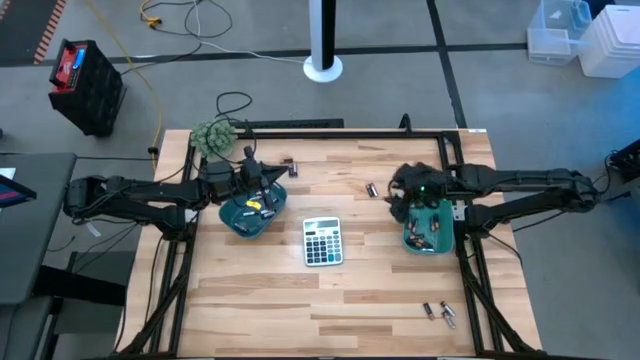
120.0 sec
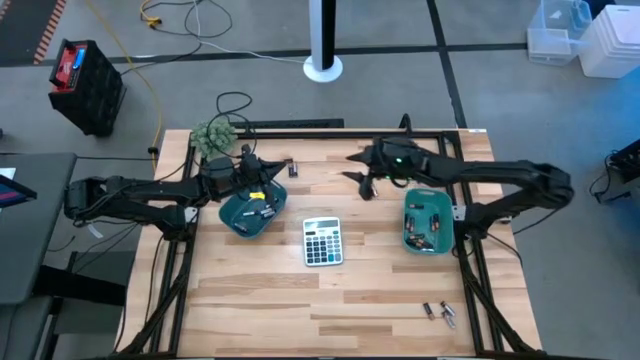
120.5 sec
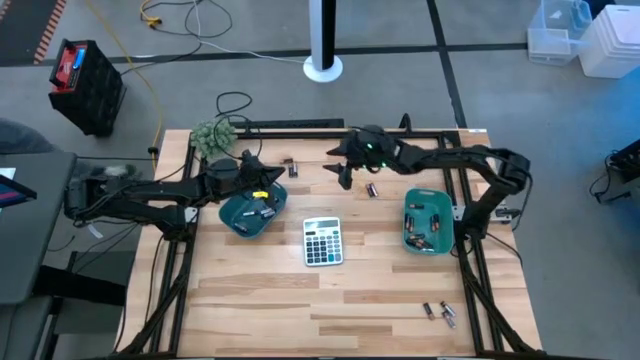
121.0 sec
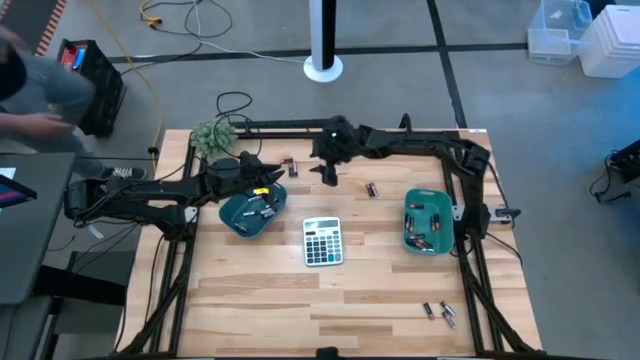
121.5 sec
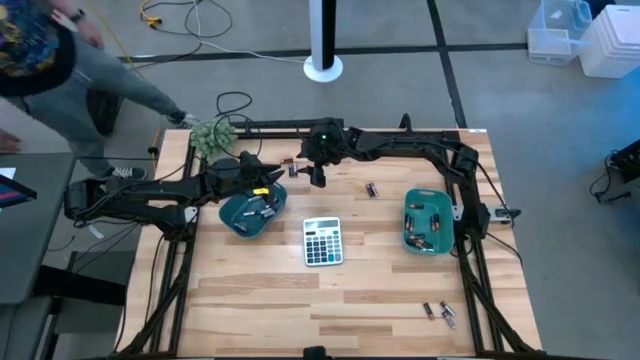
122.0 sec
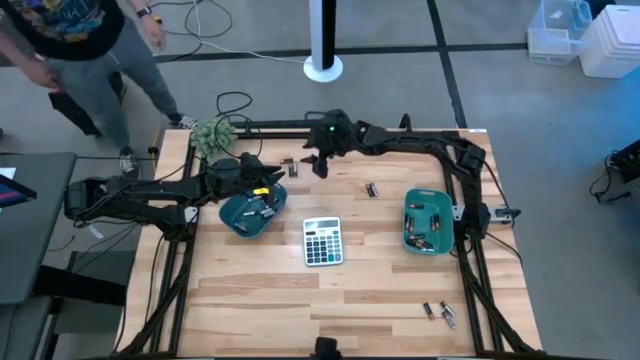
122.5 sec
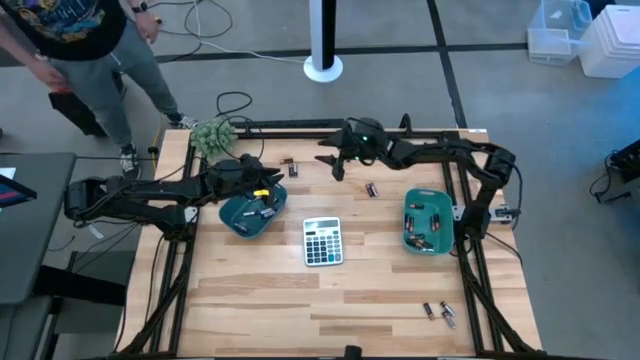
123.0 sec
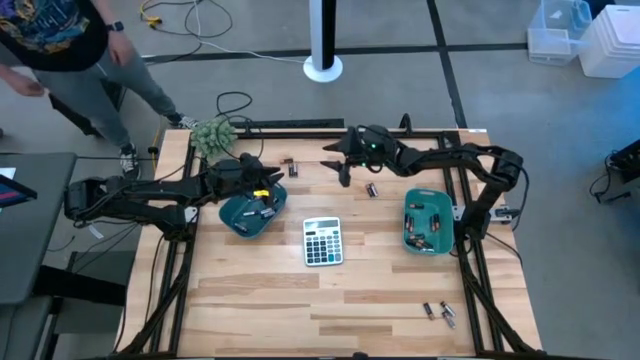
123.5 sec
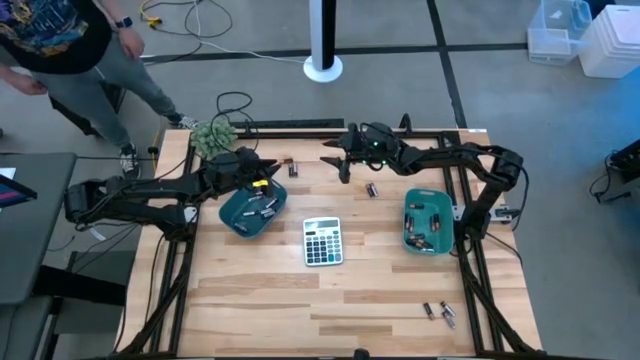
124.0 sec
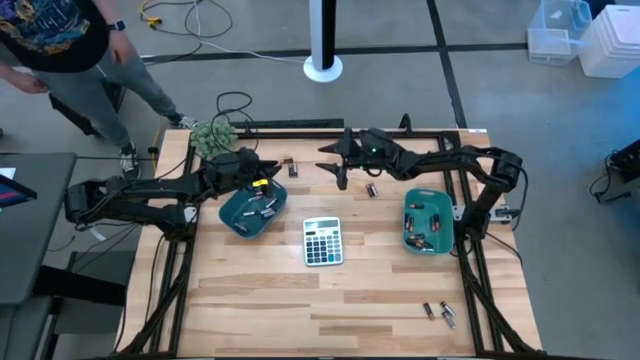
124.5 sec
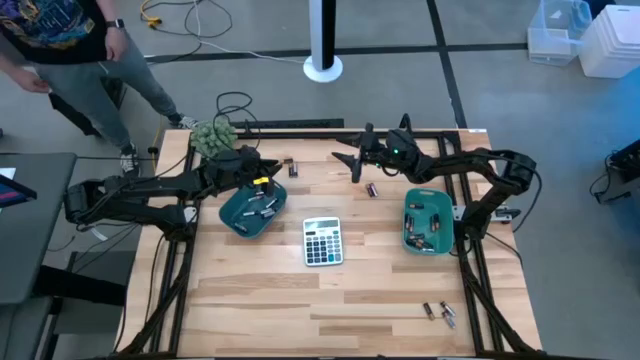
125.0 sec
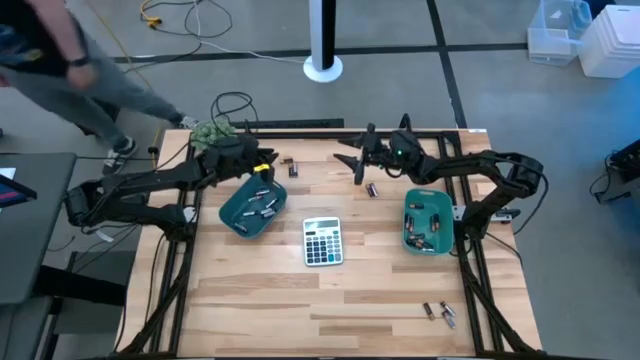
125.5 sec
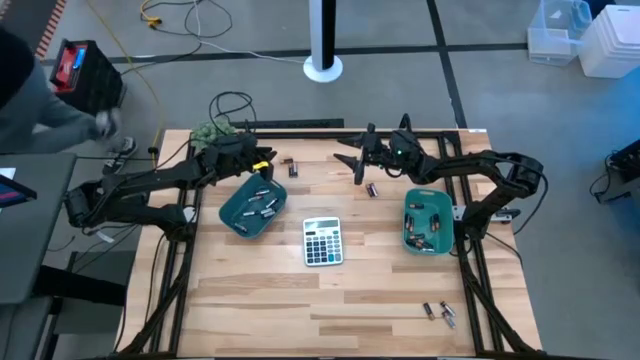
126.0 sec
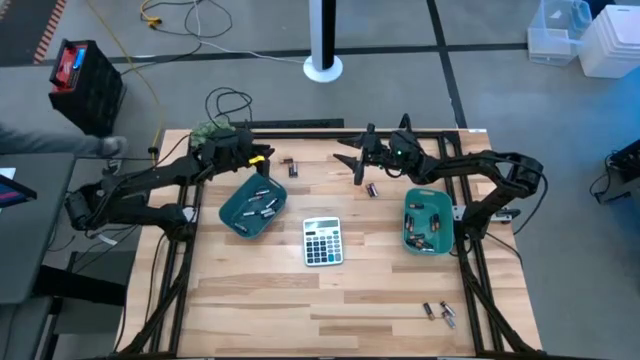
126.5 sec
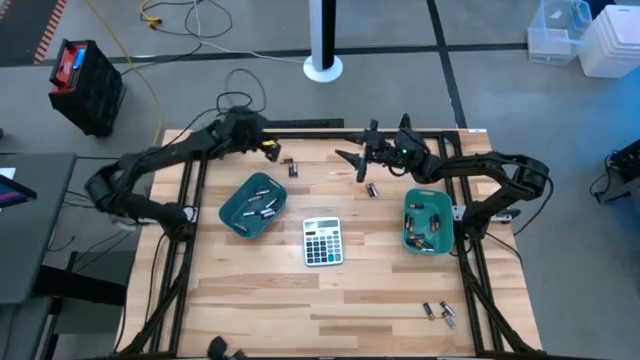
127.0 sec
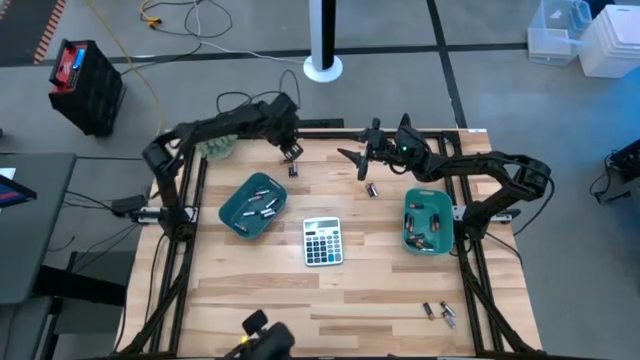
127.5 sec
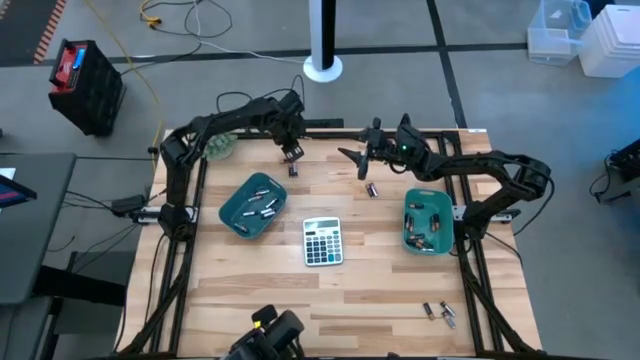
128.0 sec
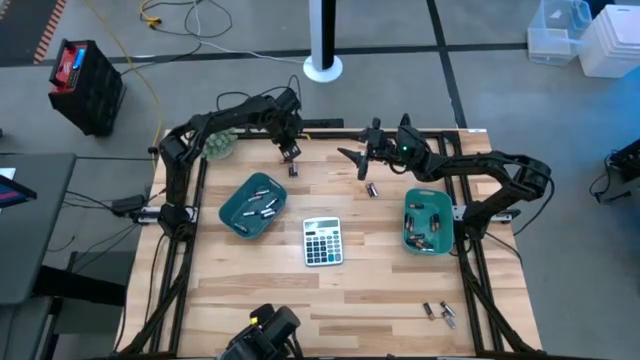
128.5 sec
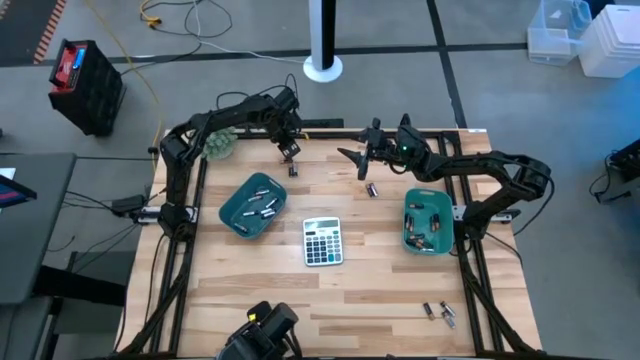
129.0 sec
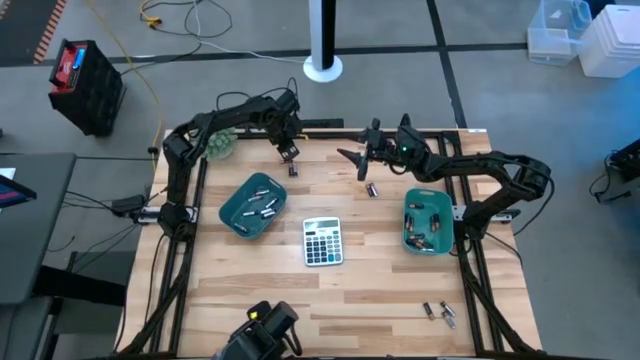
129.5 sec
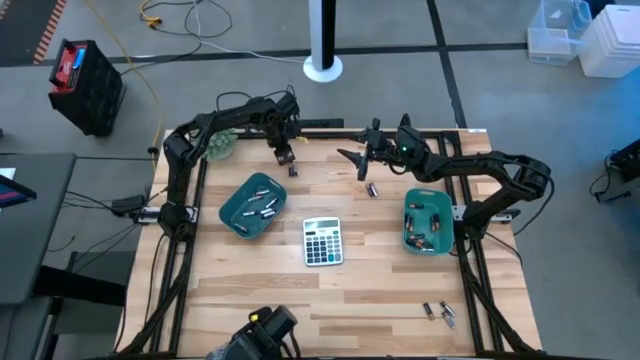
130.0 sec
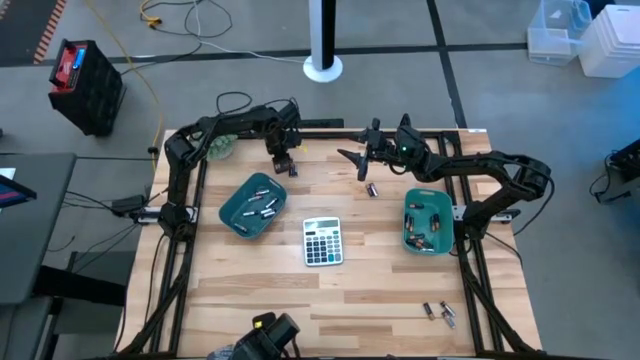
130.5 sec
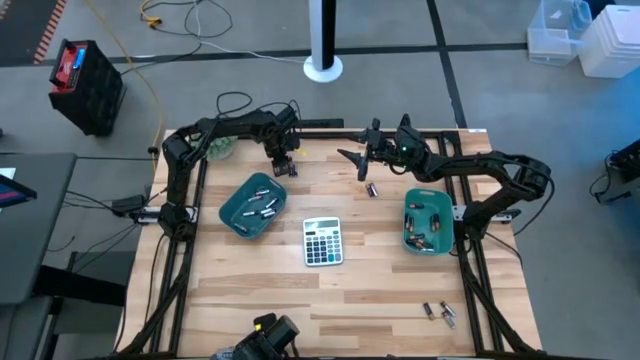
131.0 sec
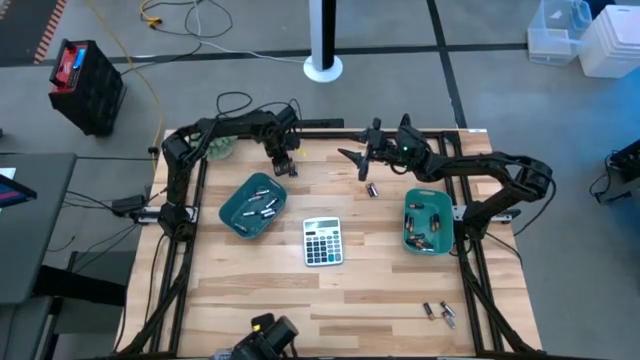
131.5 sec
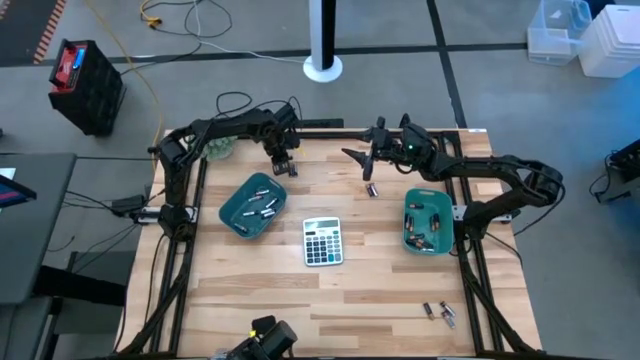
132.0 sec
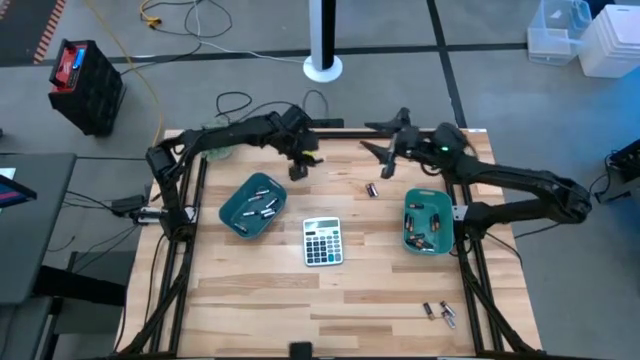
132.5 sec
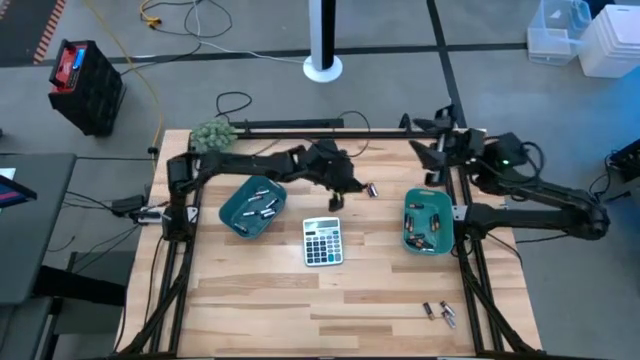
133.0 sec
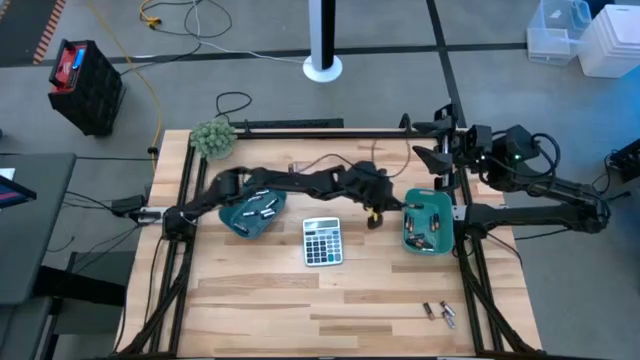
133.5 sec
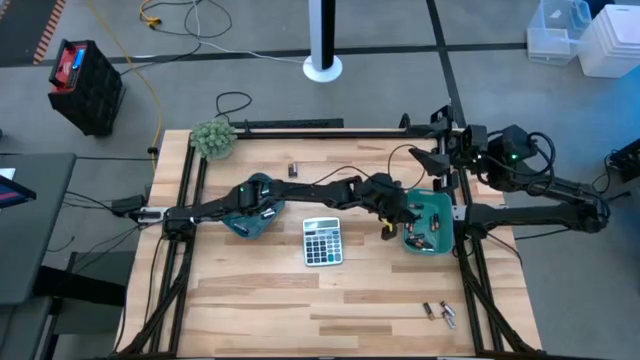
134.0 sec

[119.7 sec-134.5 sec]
Task: Sort batteries
Put the brown/black battery into the green bin

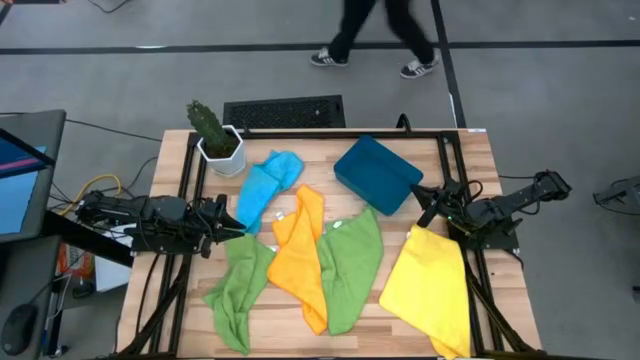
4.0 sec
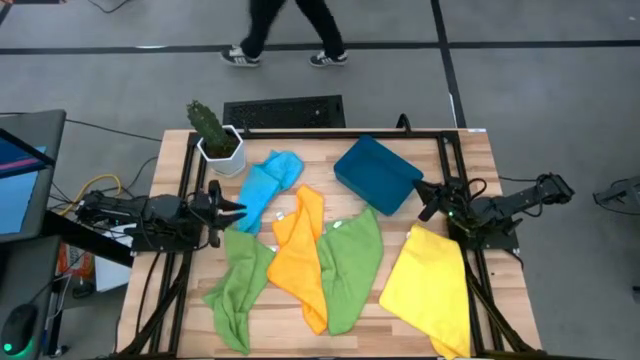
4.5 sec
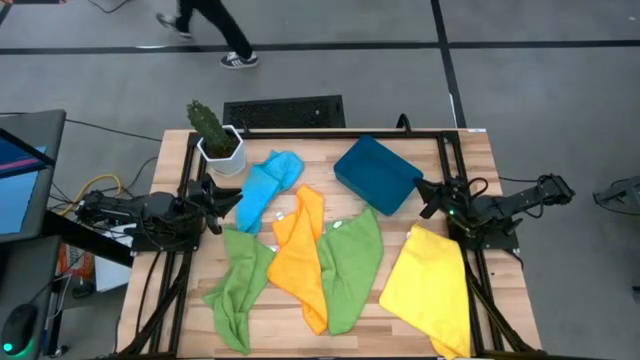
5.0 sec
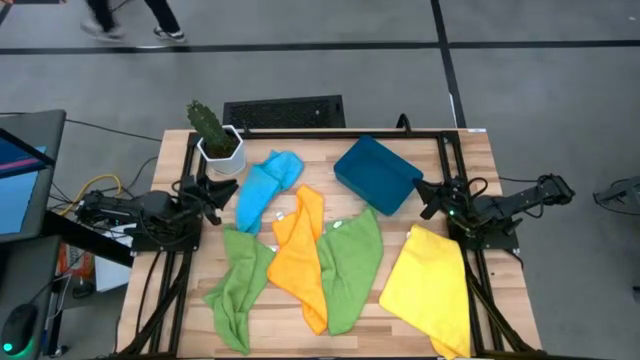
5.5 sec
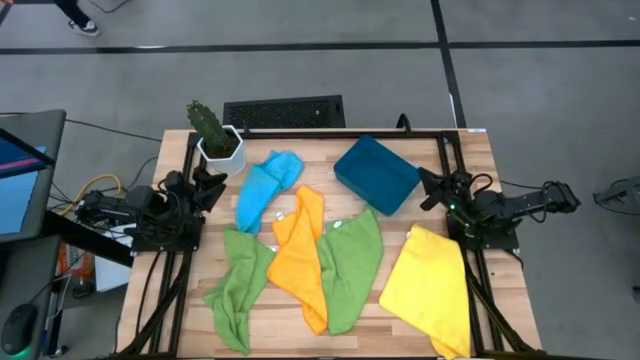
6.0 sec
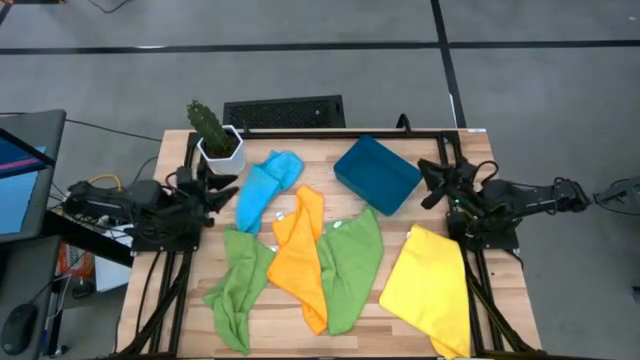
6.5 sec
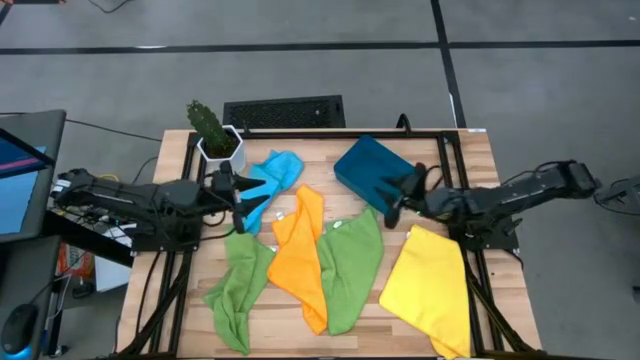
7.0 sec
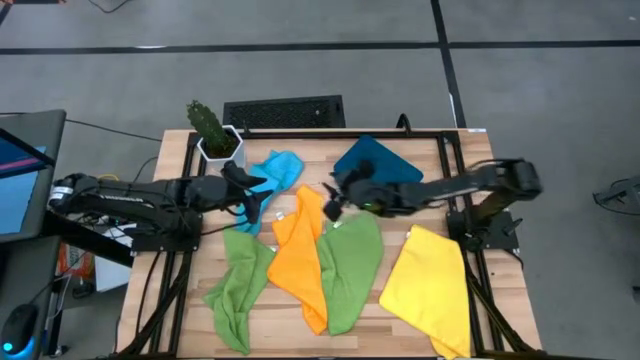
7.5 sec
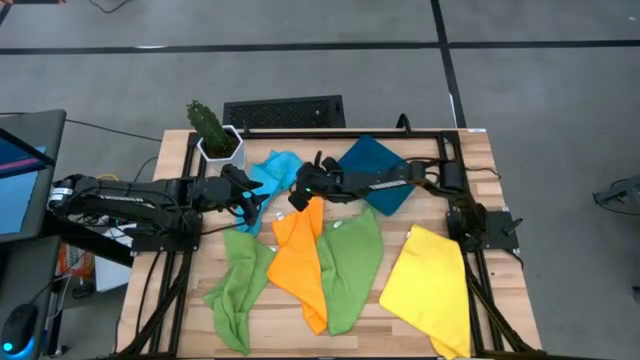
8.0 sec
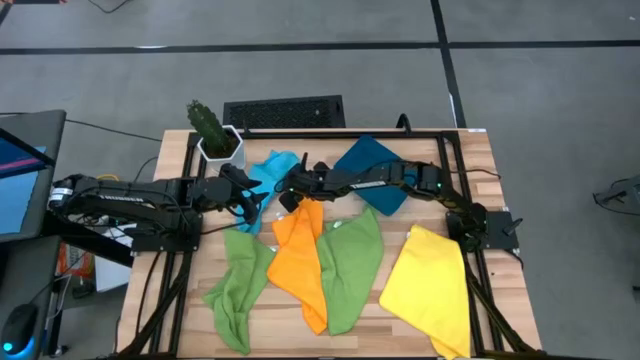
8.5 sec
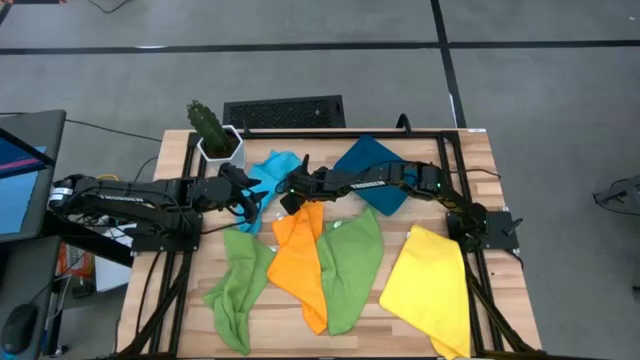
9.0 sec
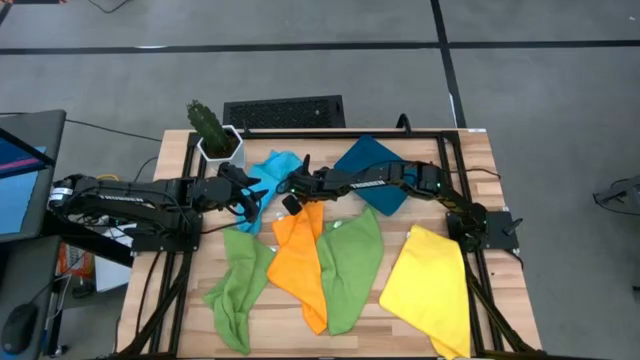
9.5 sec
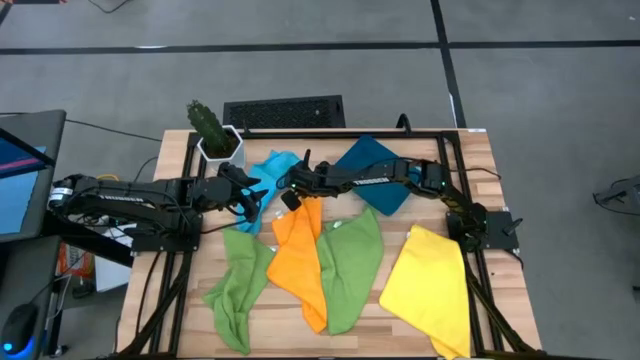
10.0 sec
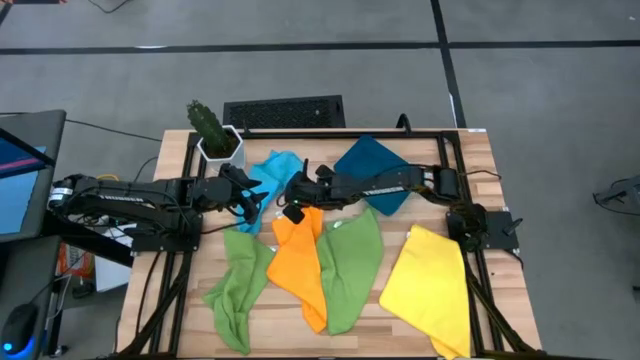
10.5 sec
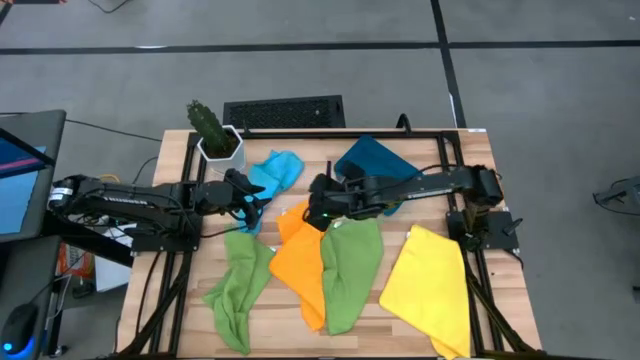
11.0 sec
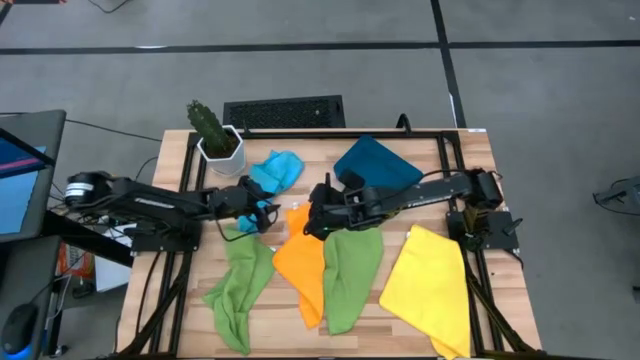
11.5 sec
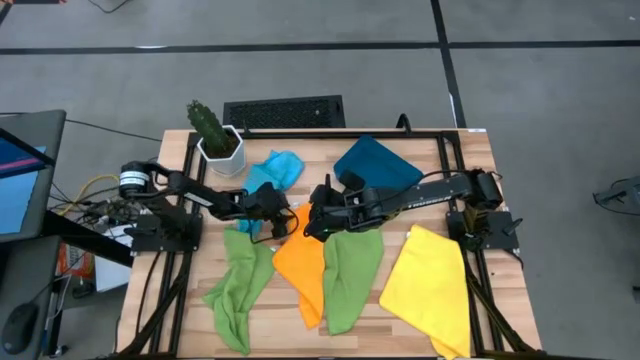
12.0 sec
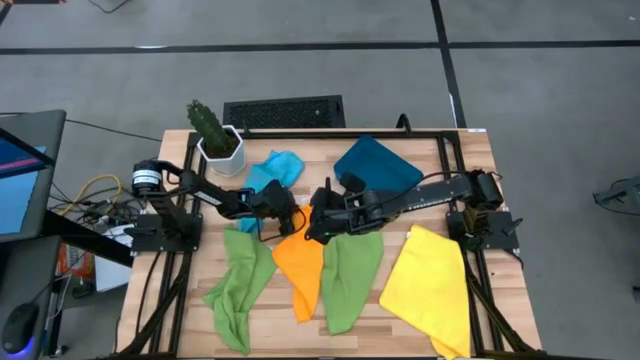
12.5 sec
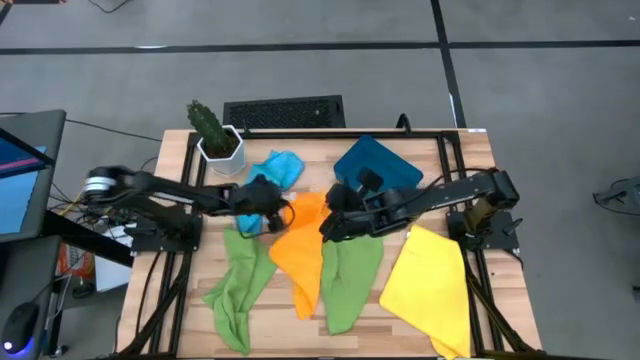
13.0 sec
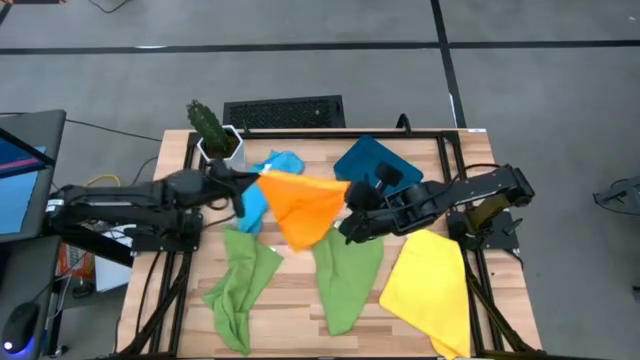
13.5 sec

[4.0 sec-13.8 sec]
Task: Fold microfiber towels
Fold the orange microfiber towel
